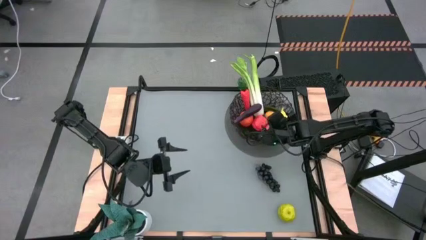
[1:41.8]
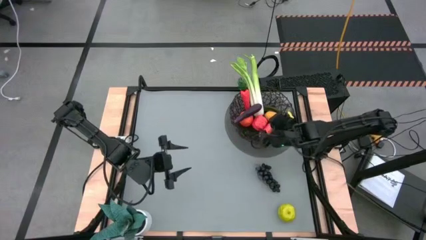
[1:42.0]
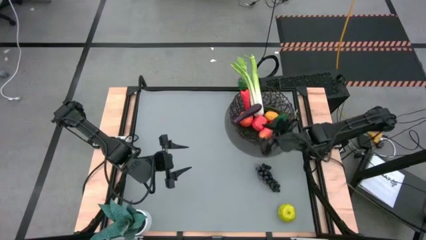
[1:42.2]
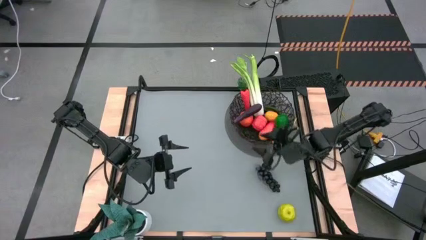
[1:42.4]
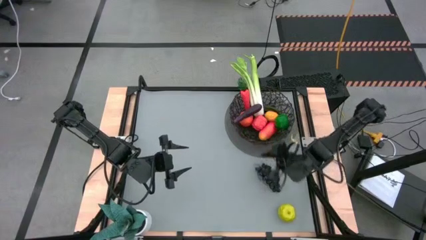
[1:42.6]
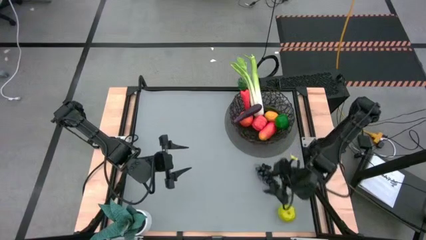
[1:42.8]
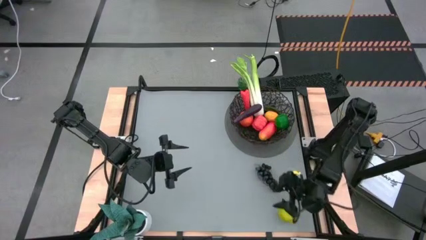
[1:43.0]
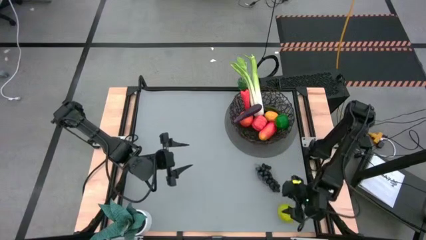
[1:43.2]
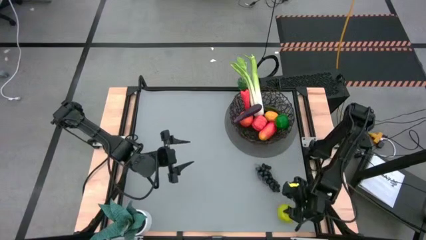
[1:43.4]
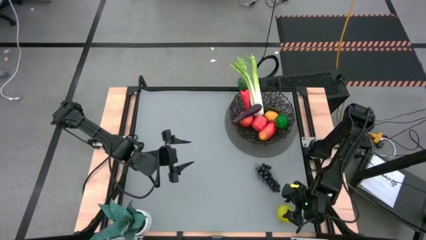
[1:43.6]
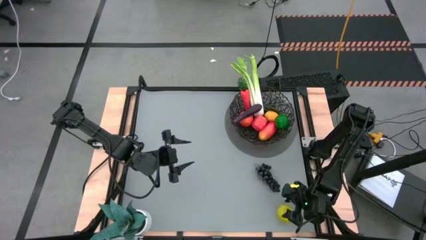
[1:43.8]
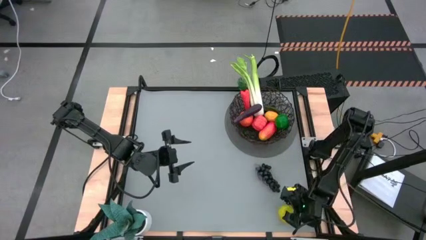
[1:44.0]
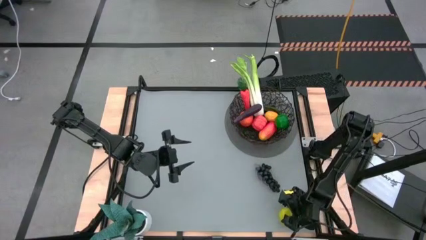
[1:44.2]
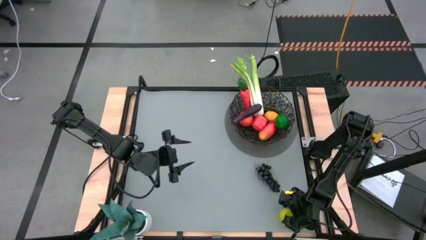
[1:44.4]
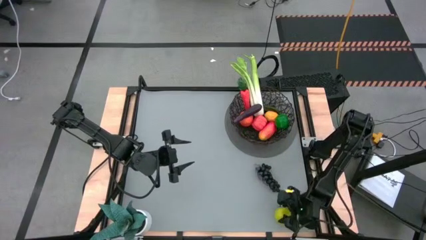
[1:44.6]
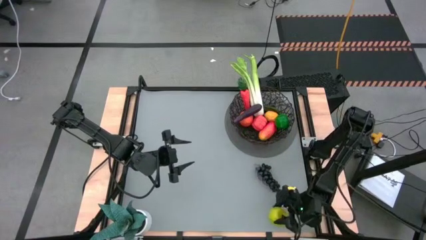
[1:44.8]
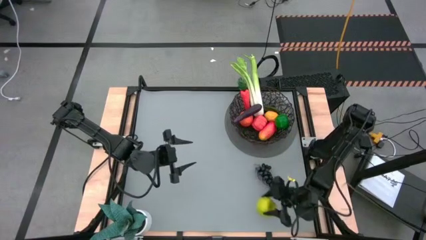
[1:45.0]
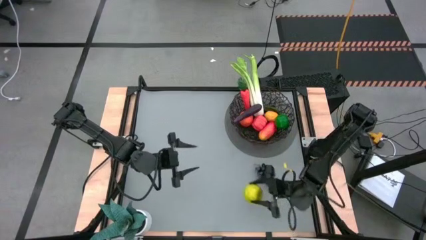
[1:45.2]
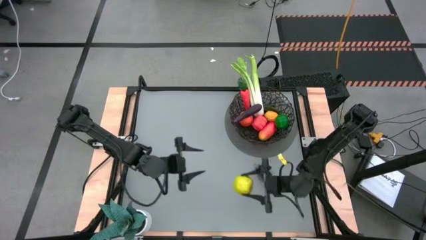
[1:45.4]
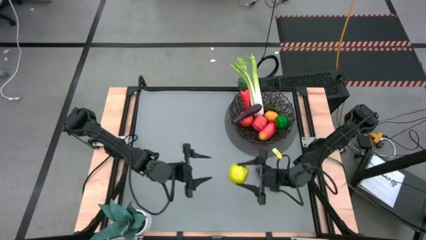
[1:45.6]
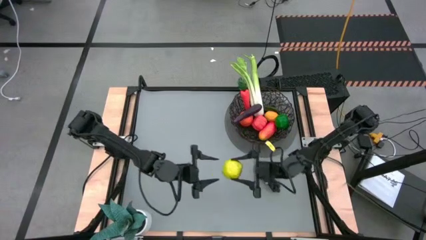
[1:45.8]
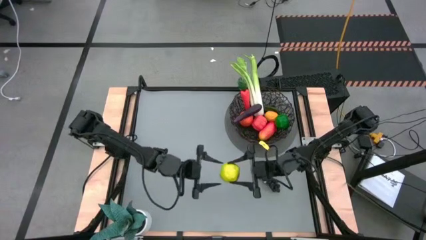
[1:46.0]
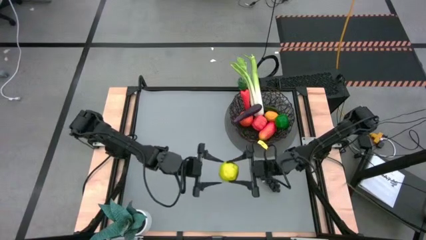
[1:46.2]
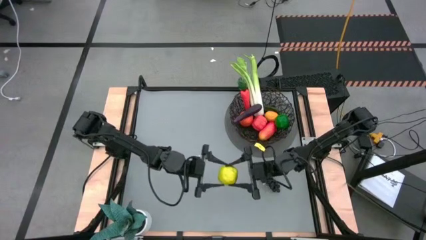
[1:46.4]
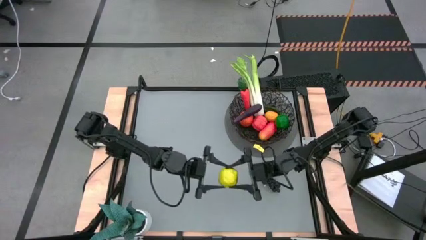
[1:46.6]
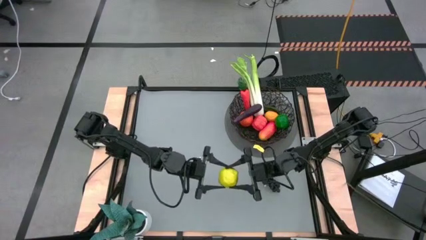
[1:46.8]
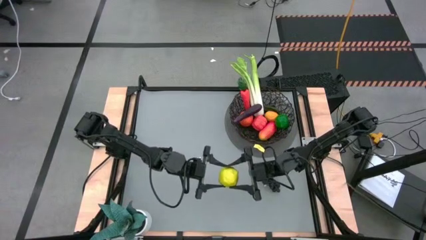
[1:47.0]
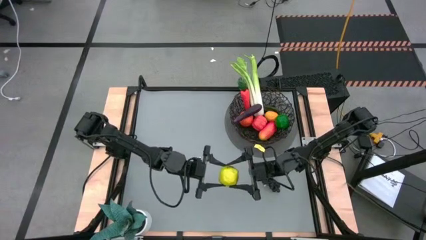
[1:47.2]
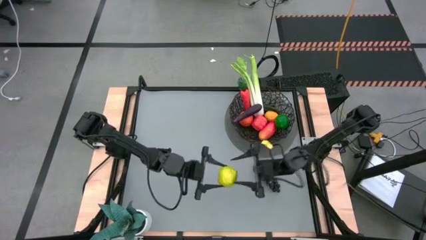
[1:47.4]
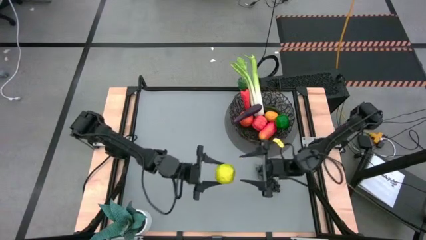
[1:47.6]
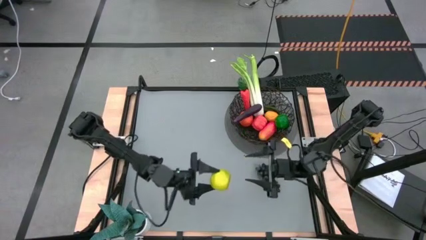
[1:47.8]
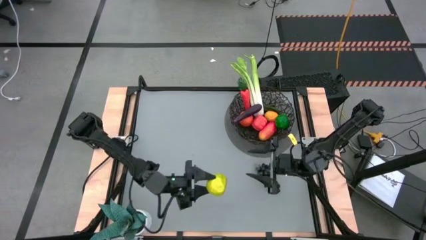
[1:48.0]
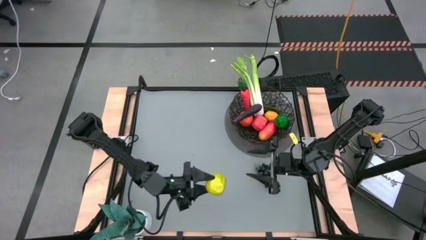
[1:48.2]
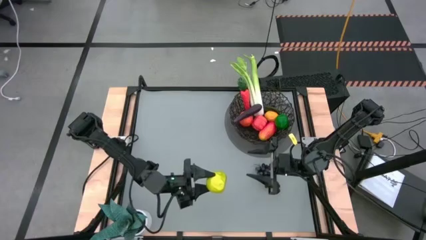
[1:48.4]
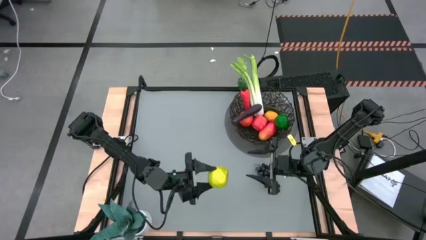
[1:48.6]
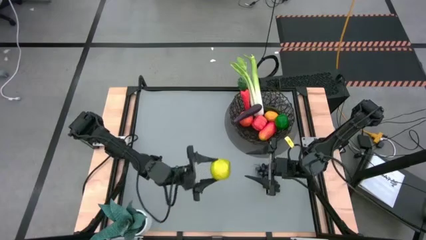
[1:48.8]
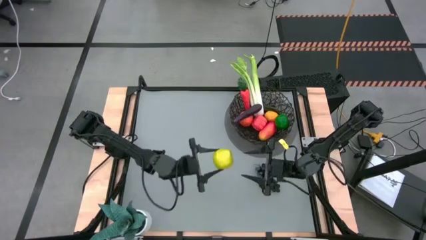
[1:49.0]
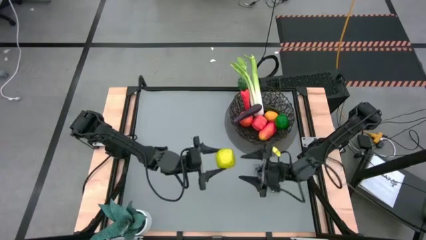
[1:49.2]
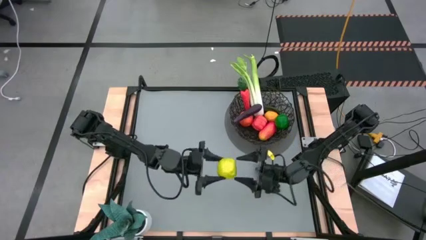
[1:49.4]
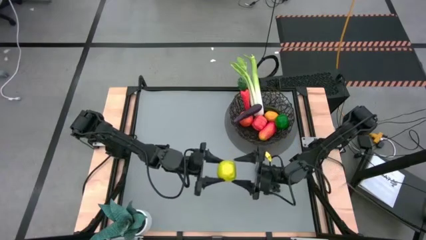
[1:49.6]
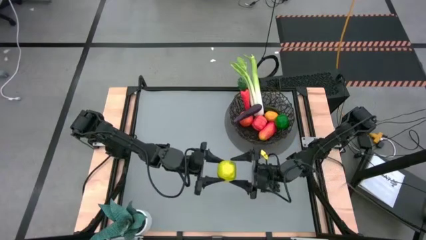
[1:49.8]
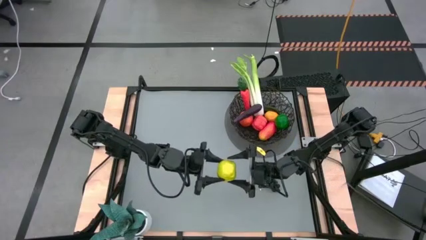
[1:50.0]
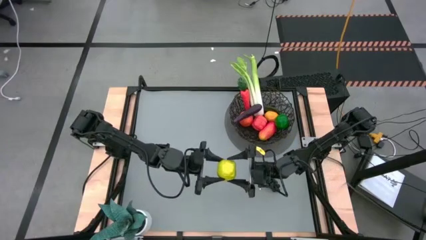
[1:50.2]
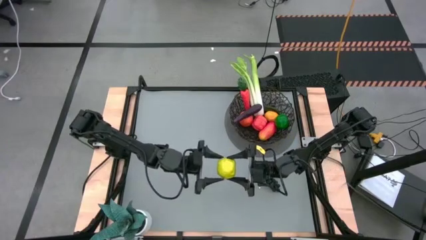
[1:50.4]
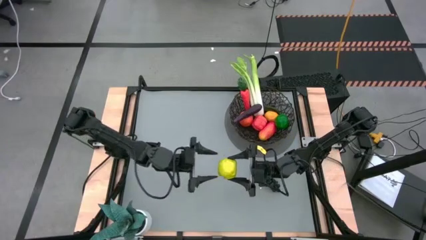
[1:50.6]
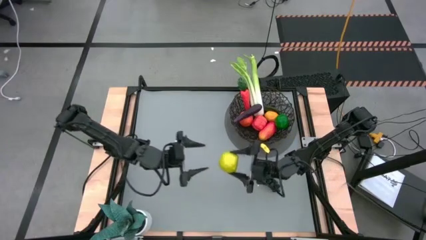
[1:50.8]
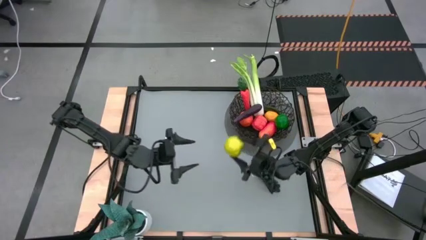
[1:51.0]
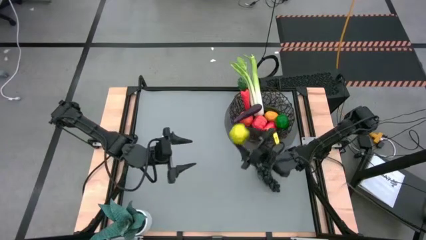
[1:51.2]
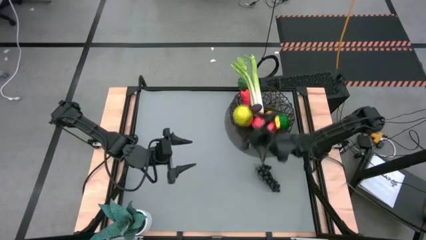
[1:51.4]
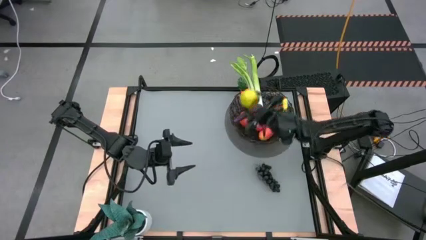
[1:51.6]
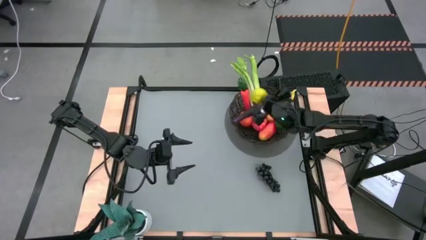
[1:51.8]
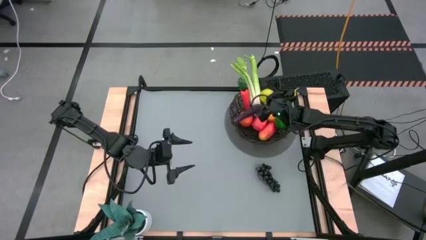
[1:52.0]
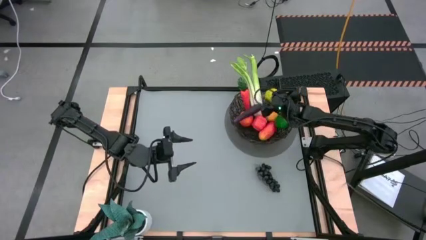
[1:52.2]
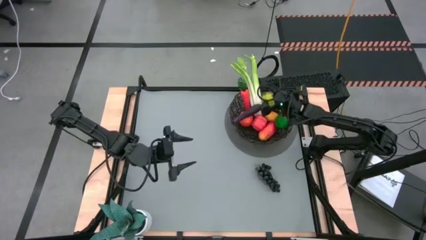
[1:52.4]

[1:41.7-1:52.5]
Task: Build produce basket
Put the apple into the black wire basket

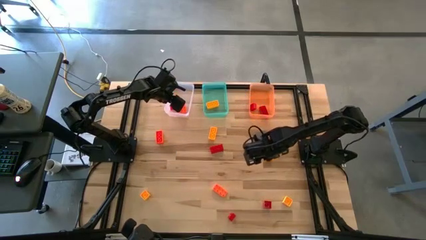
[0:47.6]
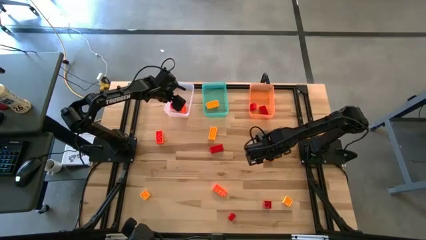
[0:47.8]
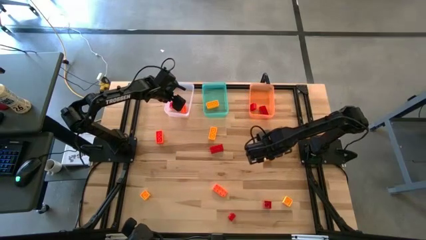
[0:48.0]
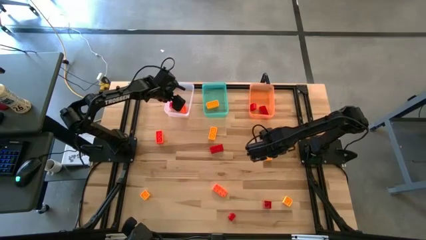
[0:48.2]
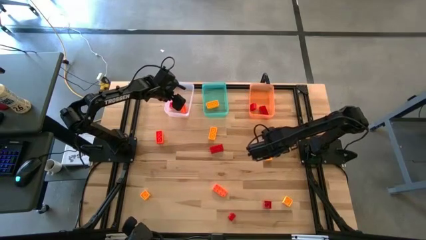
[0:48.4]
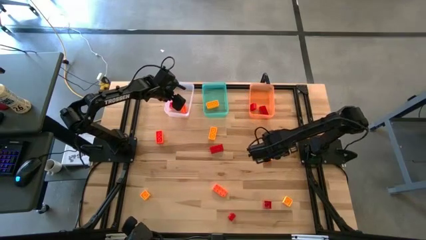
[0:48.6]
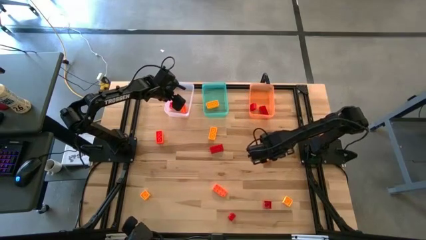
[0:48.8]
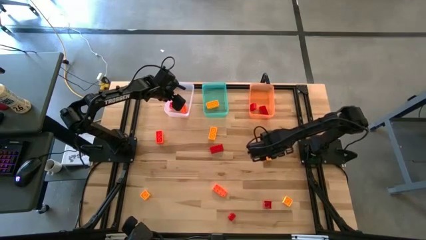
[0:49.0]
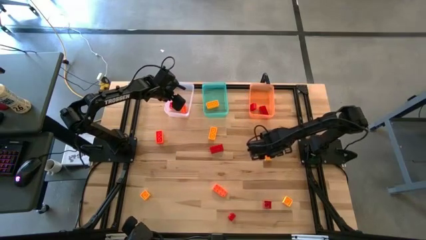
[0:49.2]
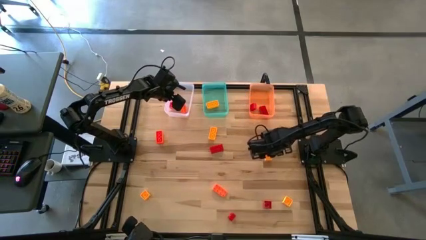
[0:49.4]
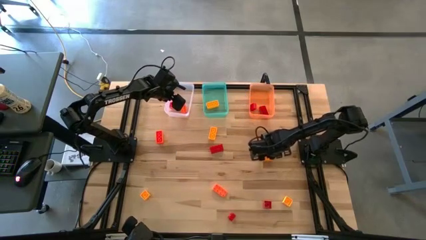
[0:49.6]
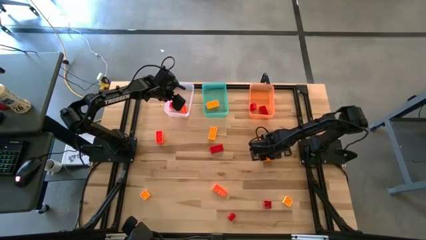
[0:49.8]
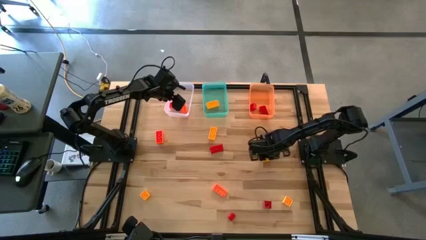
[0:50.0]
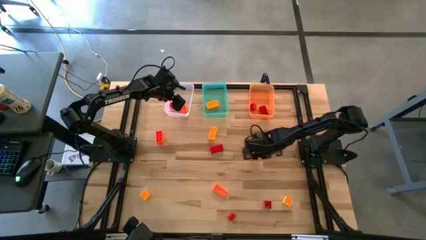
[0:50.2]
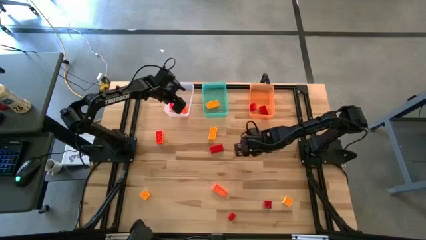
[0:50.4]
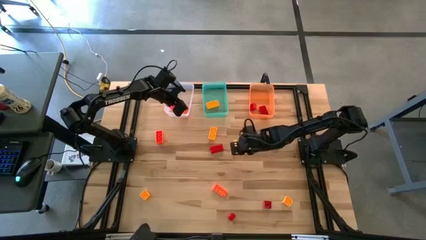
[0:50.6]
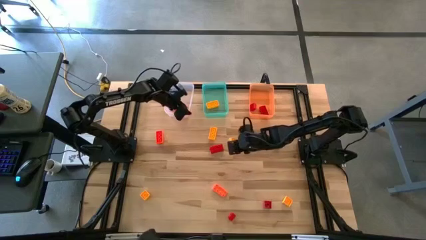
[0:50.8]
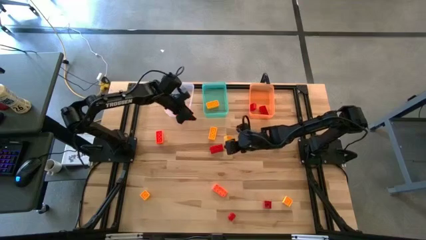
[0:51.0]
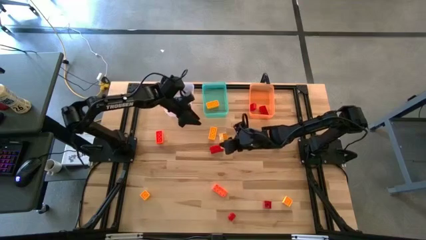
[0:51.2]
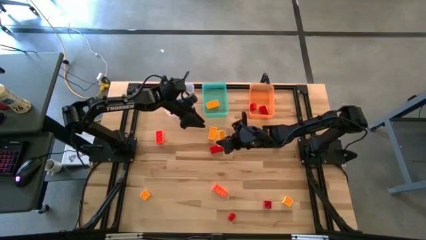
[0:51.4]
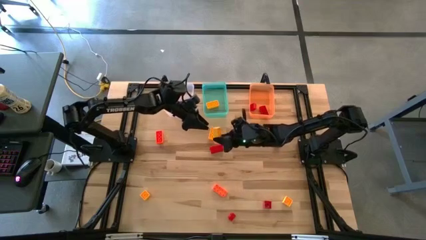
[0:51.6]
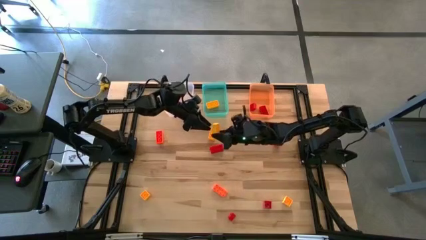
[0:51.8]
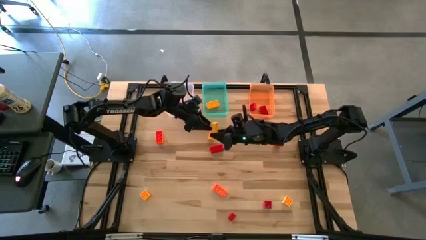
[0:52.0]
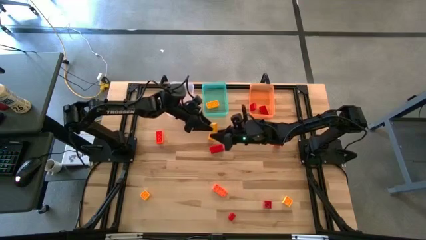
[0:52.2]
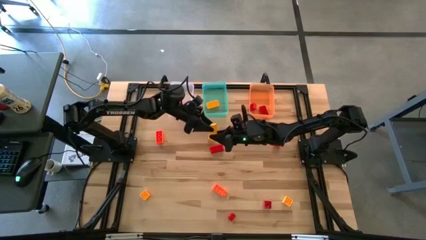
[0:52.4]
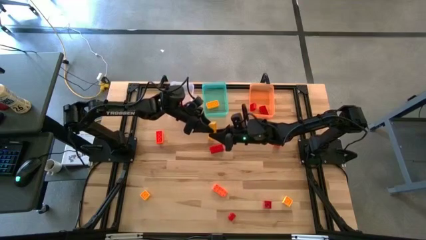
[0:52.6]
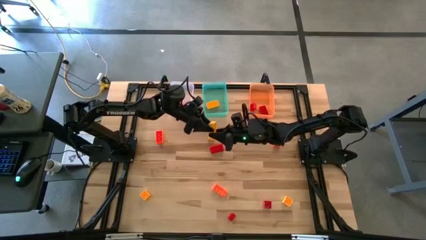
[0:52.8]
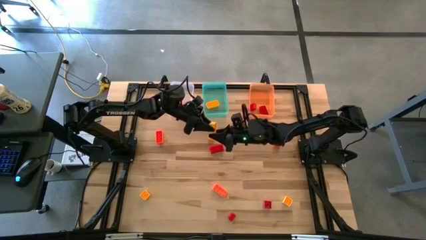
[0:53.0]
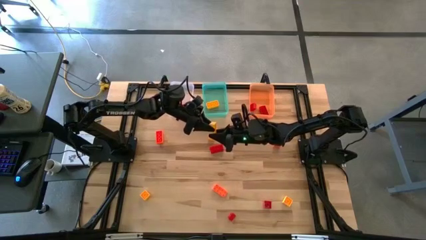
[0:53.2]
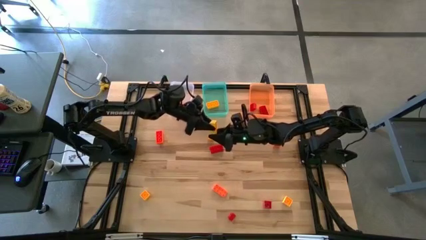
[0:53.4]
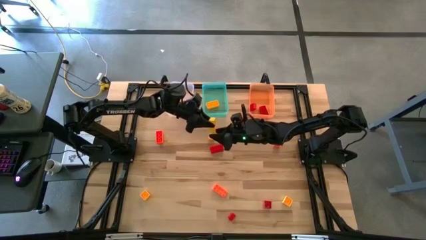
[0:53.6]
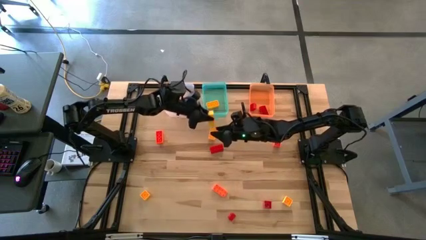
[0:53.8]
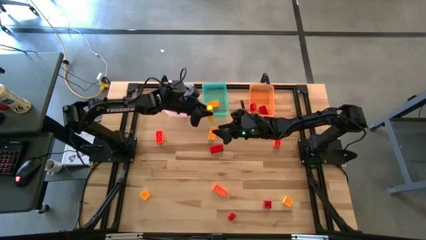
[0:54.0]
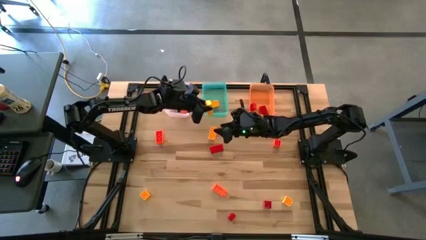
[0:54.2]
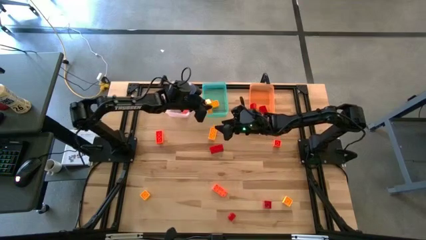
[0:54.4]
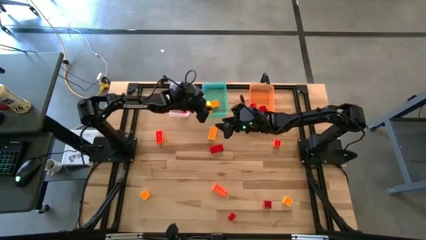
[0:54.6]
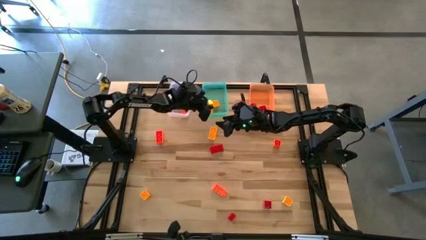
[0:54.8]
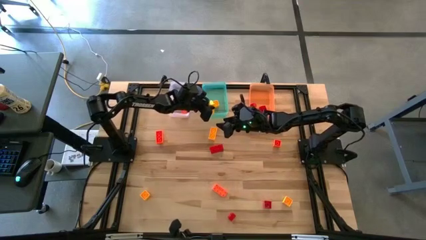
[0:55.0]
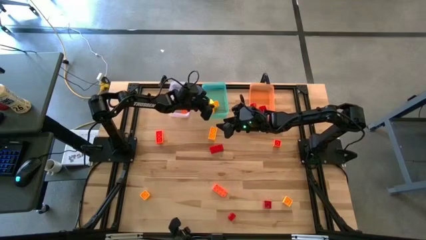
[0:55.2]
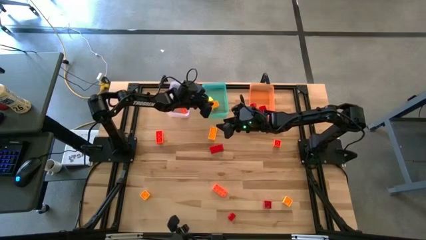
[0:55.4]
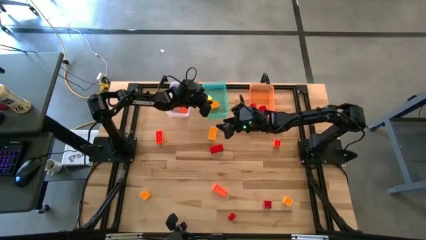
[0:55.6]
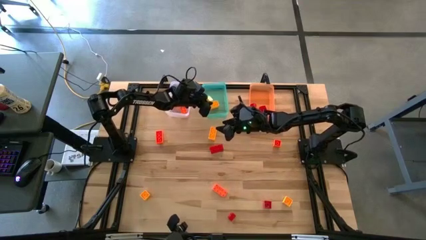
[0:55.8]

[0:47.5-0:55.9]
Task: Sort & place blocks by color
Put the yellow game piece into the green bin
